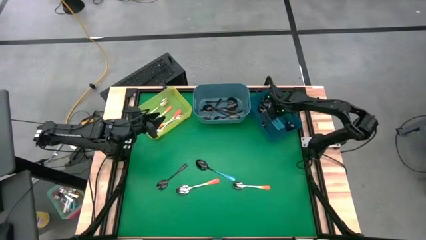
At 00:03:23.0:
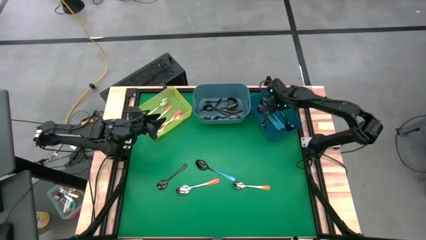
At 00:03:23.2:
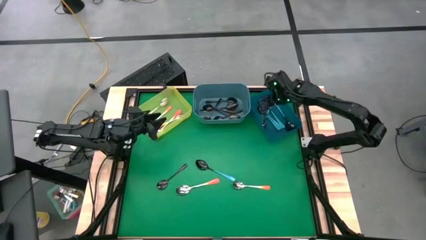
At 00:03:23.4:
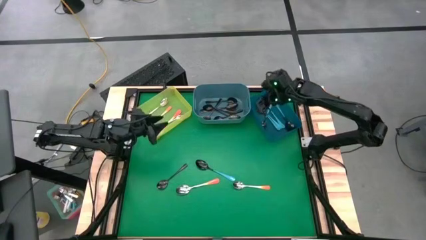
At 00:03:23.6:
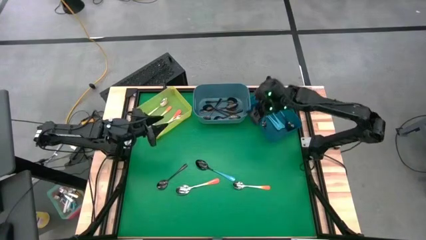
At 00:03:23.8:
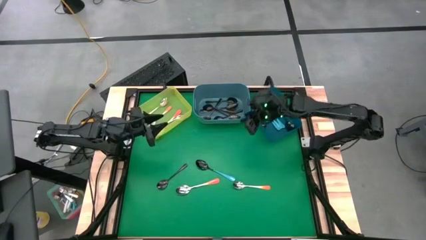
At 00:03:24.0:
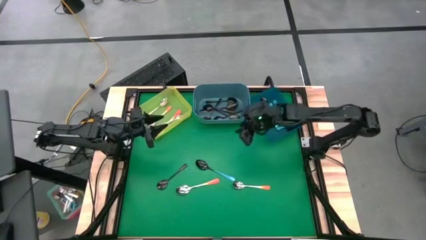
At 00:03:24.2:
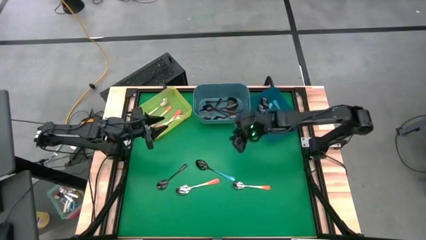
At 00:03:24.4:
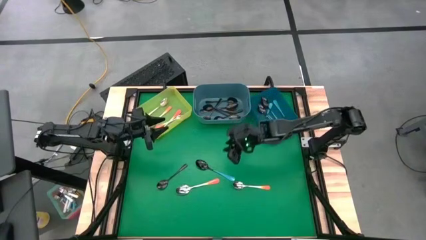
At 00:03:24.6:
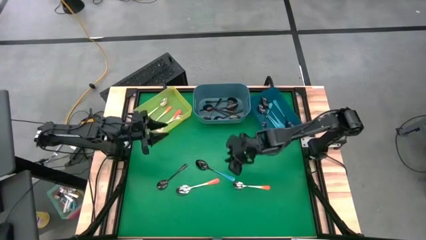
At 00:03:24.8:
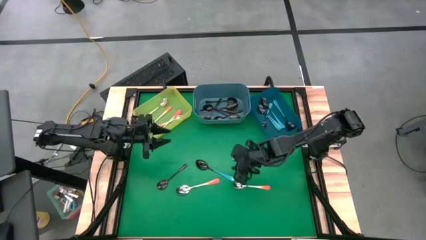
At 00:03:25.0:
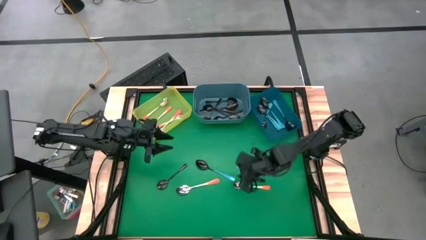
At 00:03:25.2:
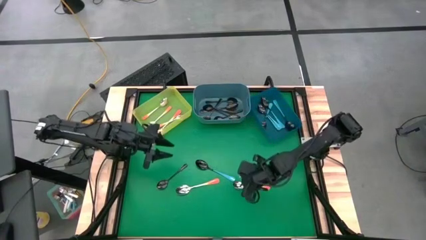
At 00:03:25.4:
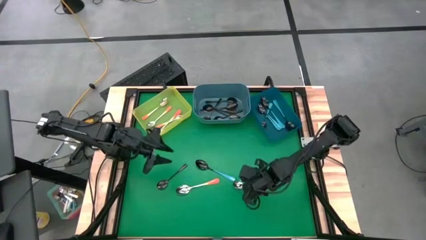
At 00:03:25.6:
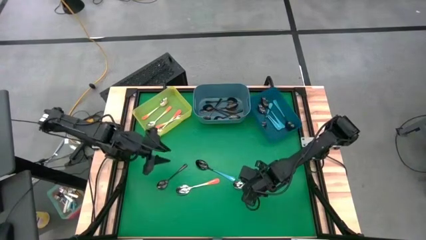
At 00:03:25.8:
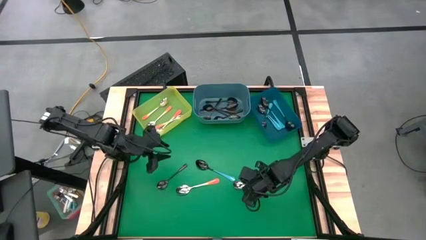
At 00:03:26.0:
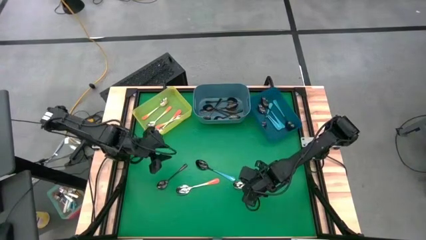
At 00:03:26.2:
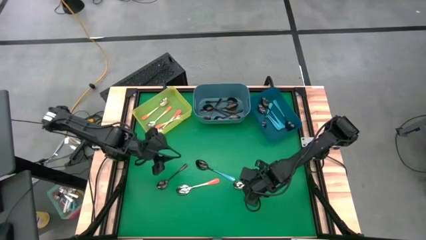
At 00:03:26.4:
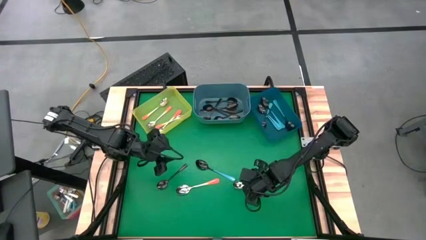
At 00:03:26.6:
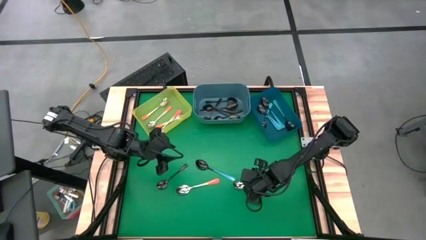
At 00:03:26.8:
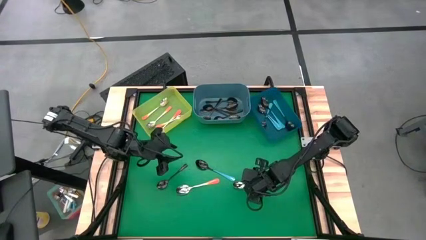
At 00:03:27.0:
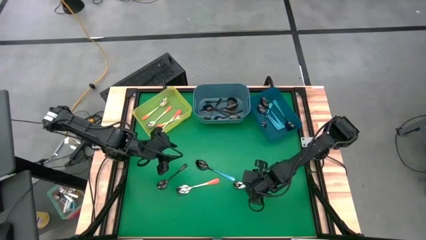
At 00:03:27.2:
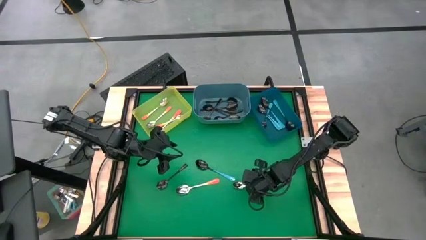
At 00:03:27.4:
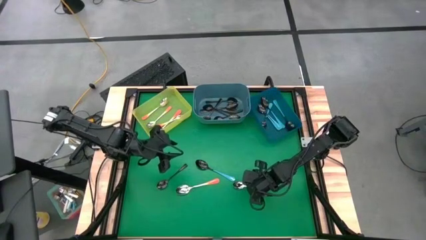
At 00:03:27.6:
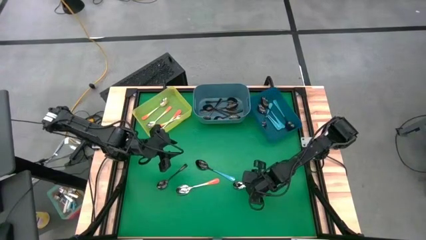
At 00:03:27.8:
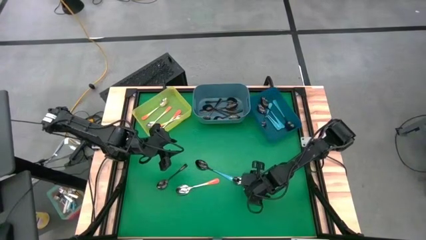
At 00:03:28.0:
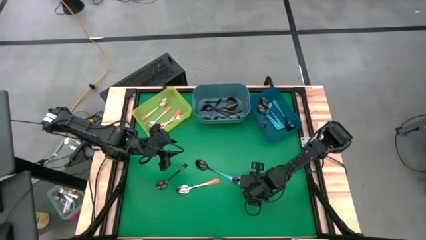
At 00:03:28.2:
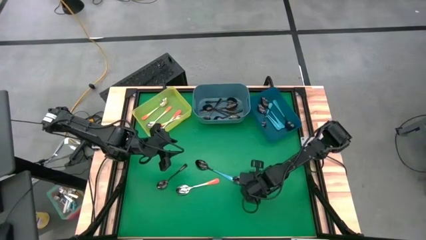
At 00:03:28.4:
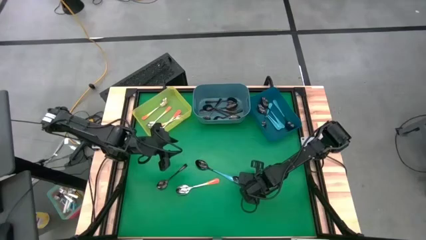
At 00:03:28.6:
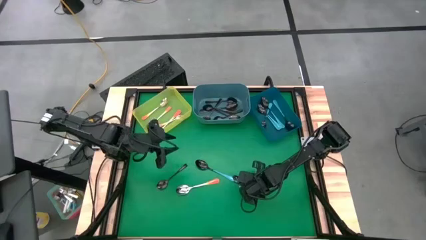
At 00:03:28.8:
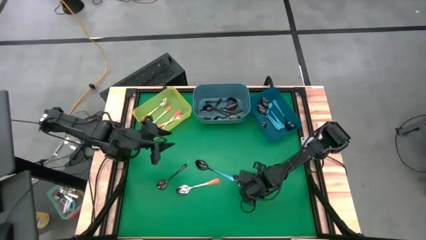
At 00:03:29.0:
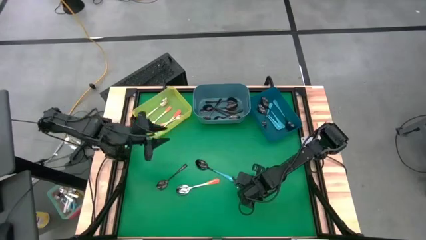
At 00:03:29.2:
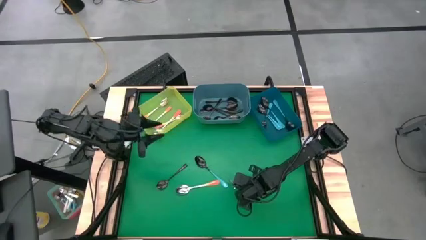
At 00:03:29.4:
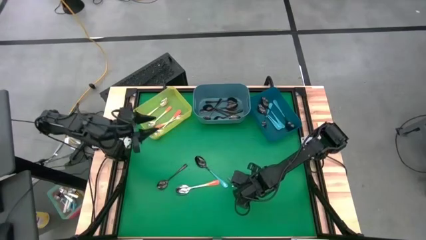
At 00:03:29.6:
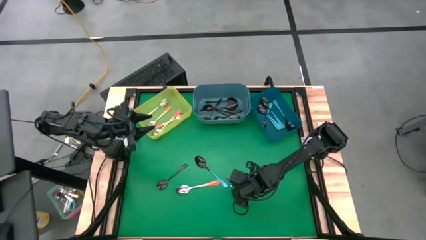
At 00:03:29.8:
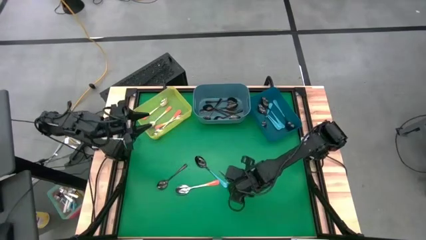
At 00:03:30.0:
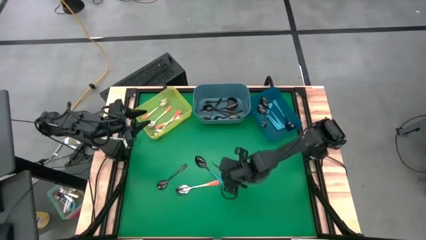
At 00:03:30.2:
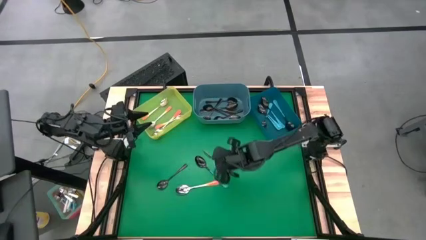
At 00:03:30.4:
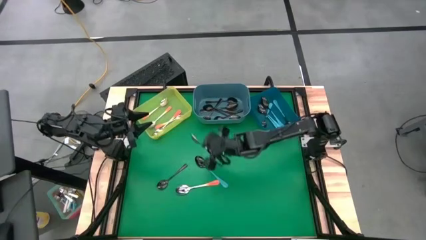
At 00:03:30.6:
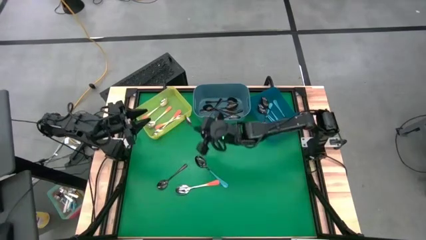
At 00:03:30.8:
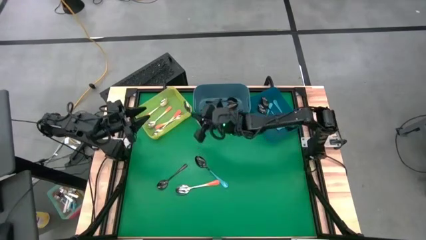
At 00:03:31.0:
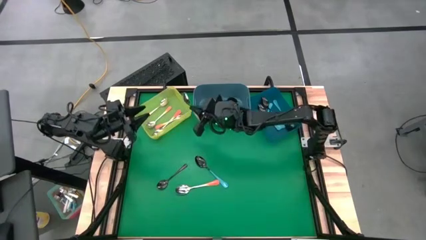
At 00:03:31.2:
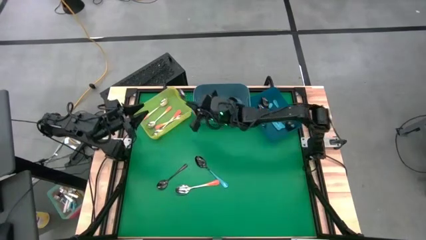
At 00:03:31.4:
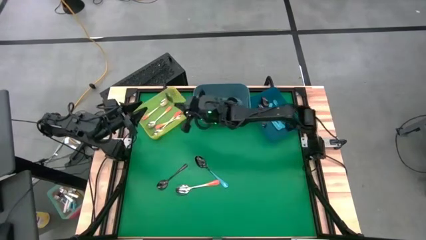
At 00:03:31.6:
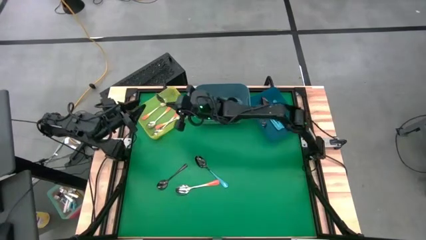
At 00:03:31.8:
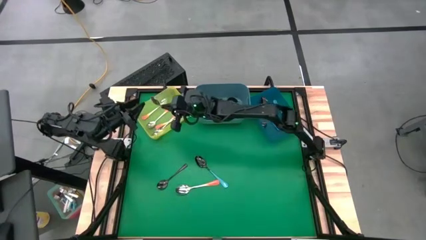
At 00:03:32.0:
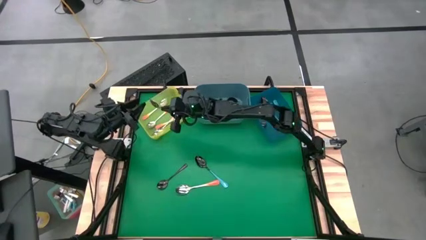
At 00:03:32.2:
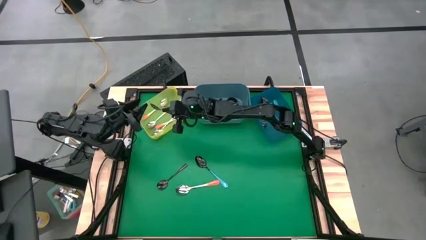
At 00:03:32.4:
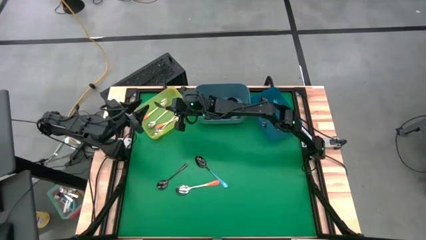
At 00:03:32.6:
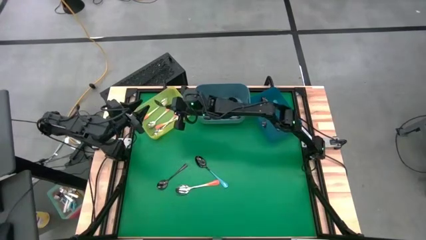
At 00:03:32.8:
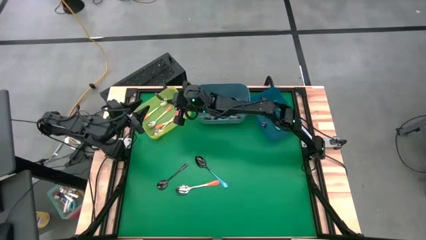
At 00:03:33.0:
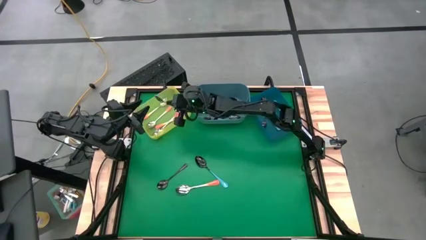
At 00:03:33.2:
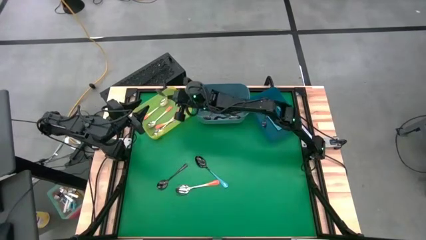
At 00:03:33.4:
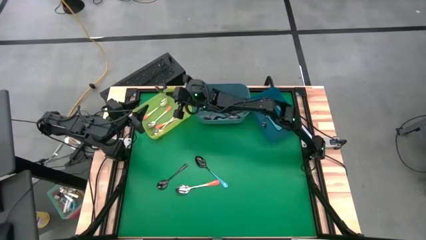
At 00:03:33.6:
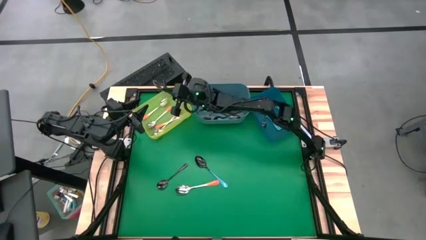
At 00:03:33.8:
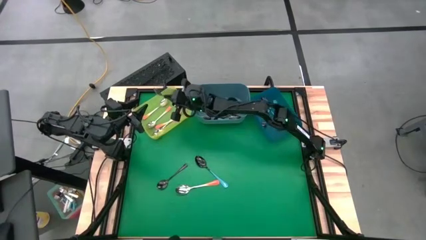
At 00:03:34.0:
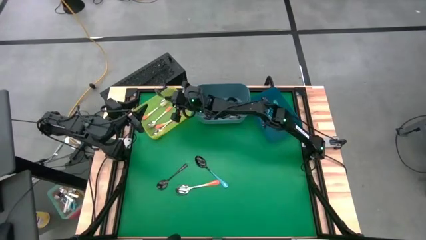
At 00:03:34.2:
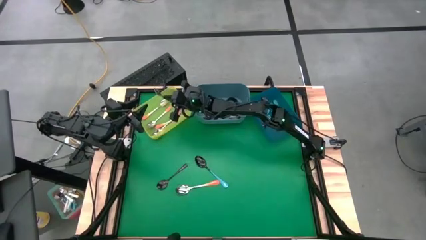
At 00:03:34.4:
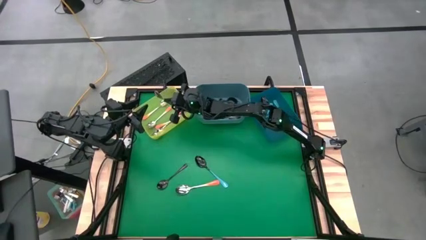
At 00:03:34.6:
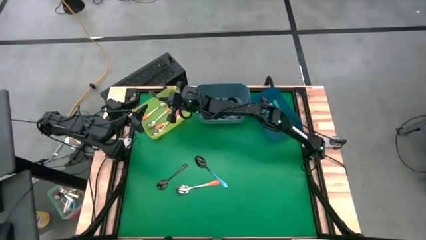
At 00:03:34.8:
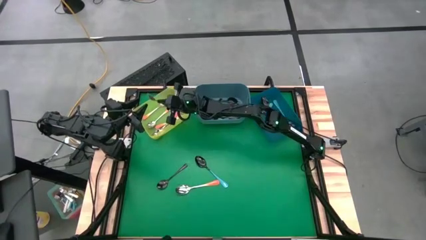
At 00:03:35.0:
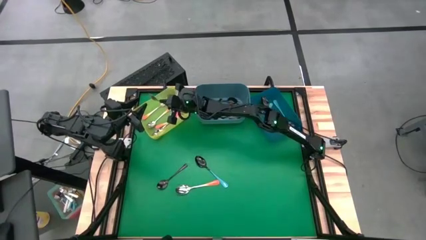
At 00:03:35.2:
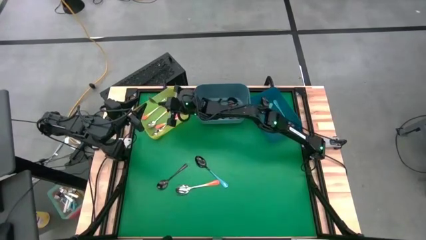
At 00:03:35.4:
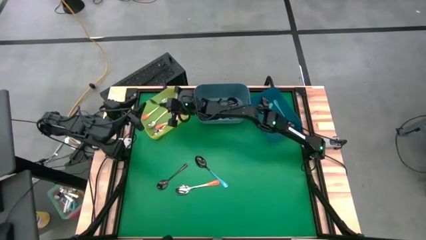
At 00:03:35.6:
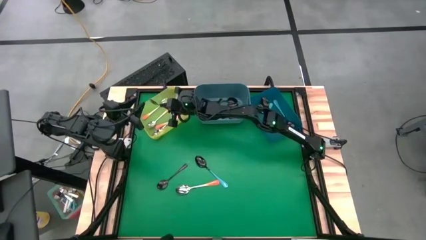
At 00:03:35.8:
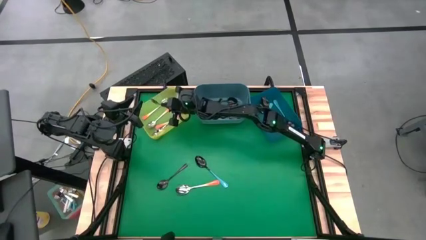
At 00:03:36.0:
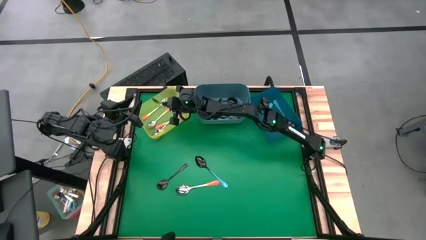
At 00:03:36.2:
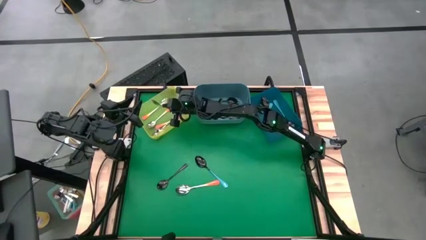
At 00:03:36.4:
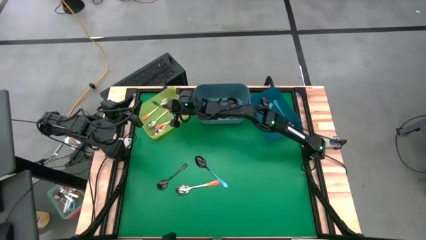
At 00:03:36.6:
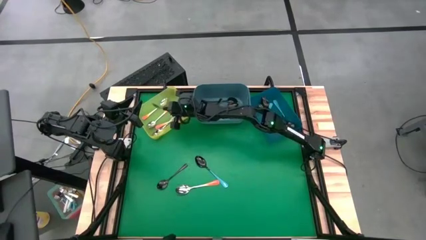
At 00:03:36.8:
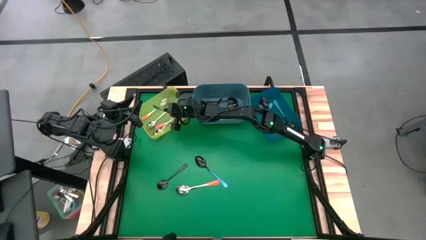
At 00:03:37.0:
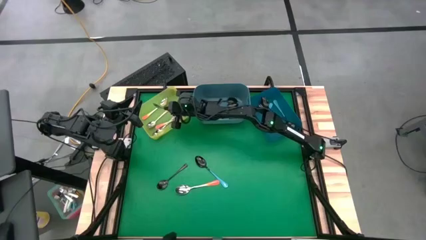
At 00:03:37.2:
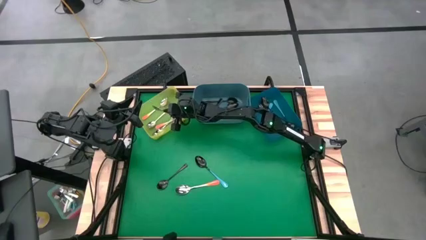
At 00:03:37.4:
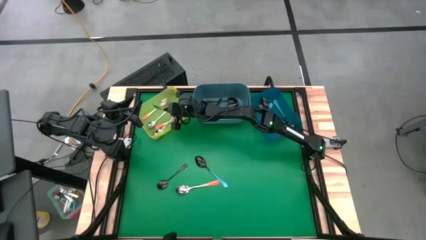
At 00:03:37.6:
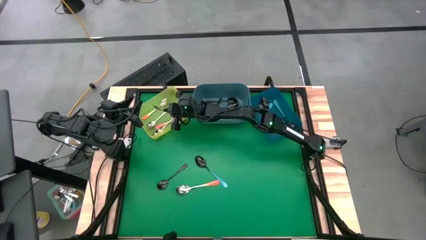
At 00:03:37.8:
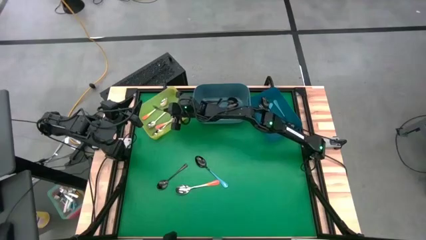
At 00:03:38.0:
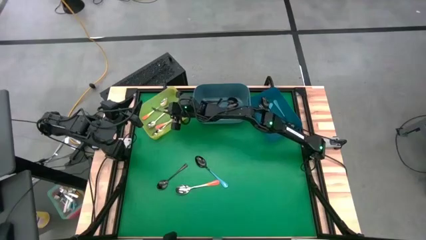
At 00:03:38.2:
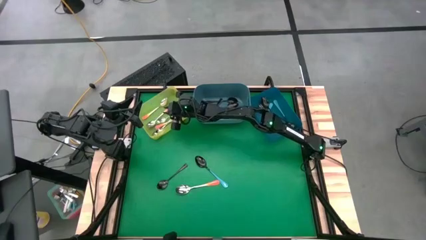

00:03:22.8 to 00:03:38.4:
Task: Sort silverware by color (type)
Put the orange spoon into the yellow bin
